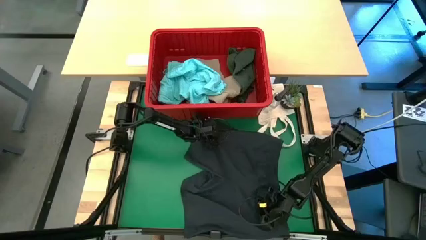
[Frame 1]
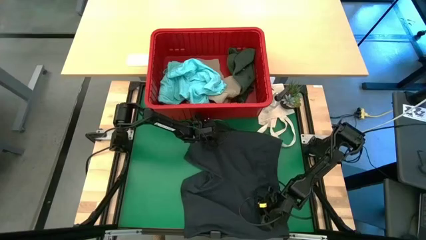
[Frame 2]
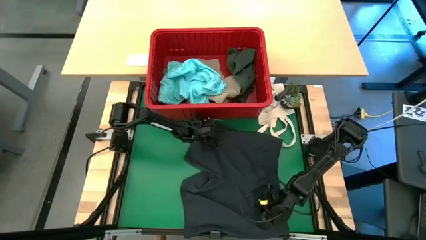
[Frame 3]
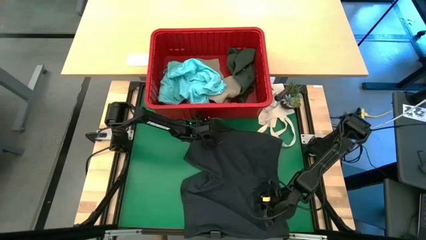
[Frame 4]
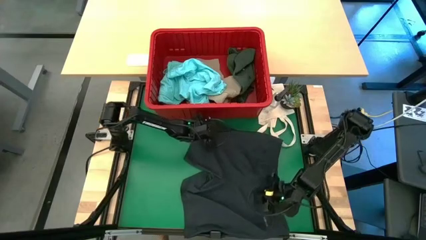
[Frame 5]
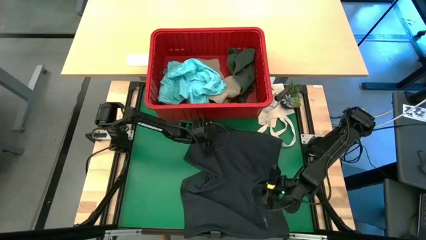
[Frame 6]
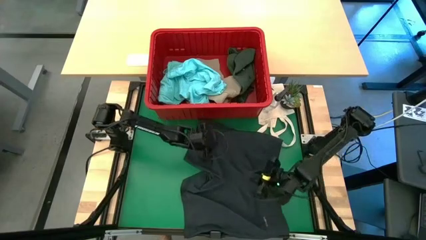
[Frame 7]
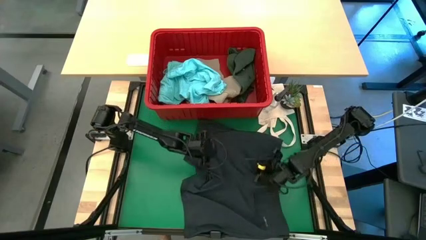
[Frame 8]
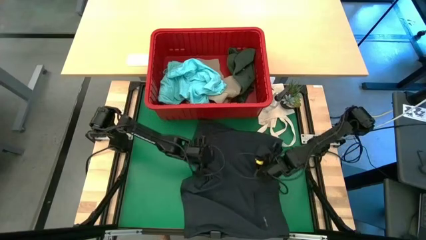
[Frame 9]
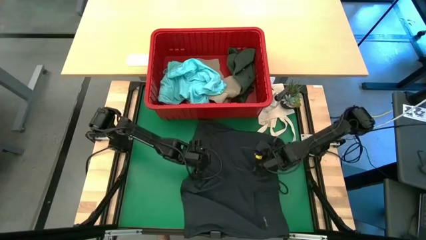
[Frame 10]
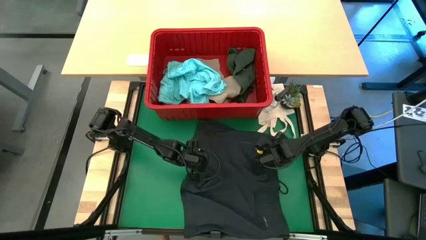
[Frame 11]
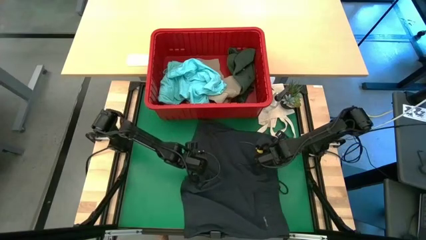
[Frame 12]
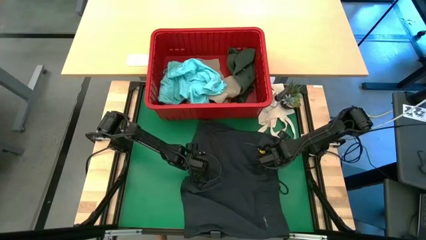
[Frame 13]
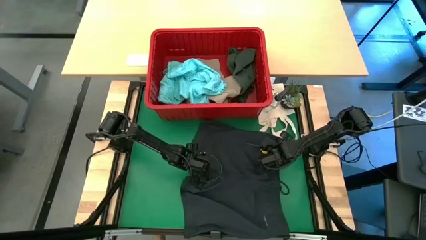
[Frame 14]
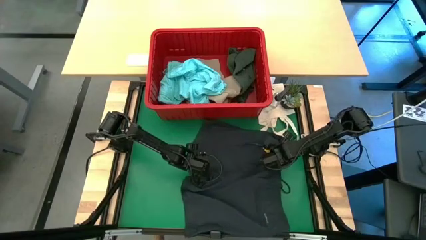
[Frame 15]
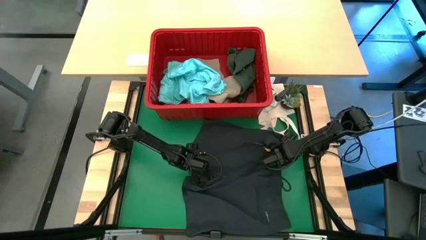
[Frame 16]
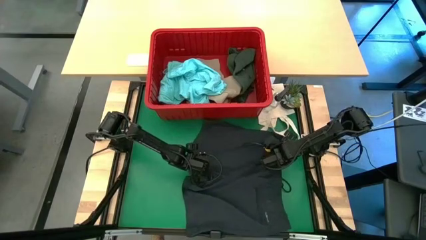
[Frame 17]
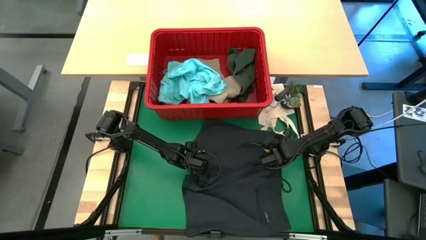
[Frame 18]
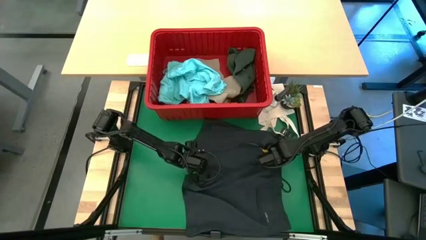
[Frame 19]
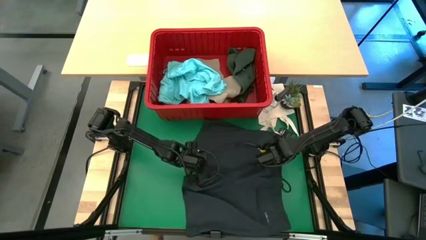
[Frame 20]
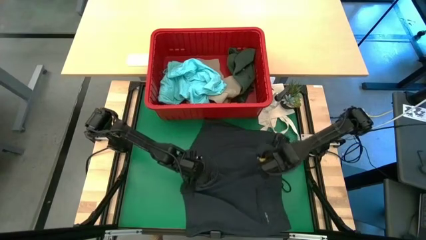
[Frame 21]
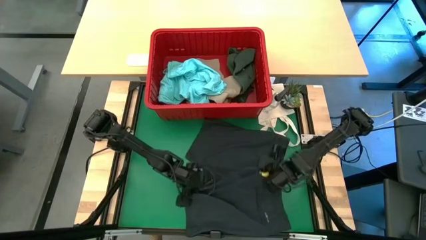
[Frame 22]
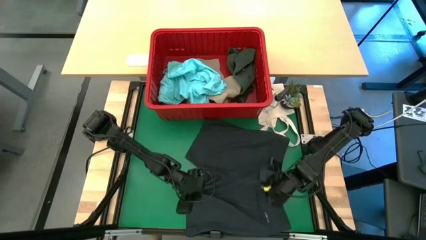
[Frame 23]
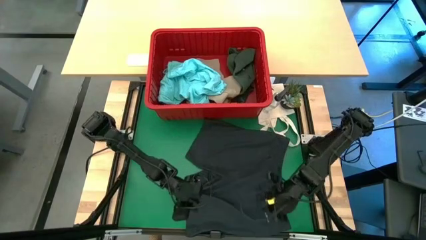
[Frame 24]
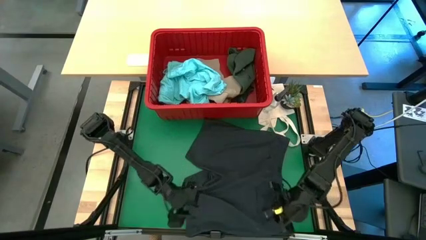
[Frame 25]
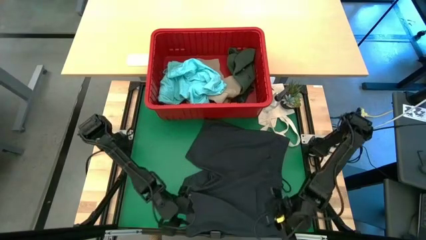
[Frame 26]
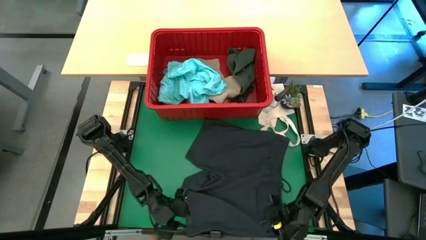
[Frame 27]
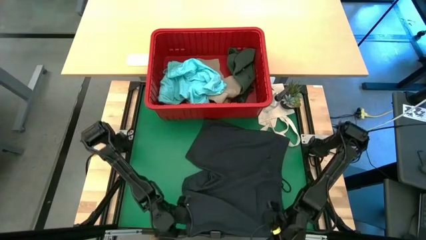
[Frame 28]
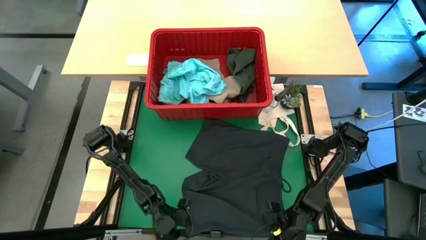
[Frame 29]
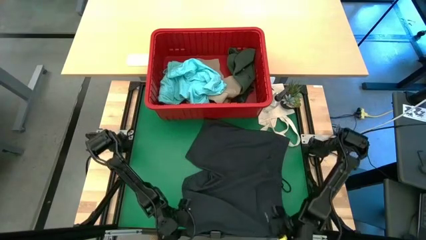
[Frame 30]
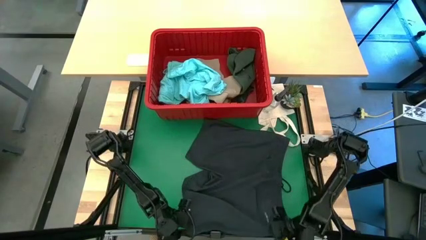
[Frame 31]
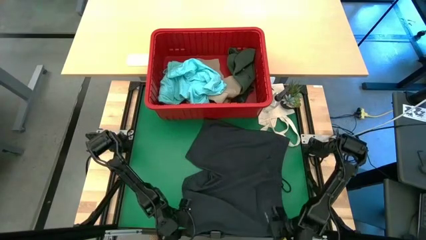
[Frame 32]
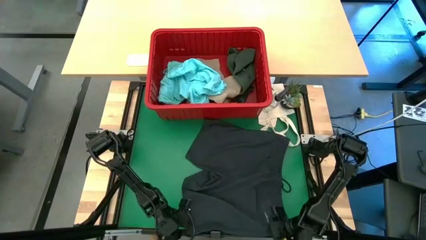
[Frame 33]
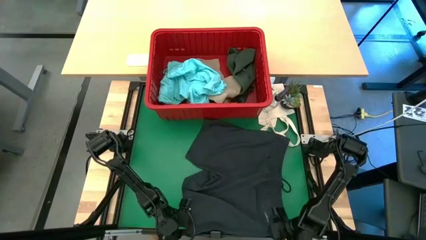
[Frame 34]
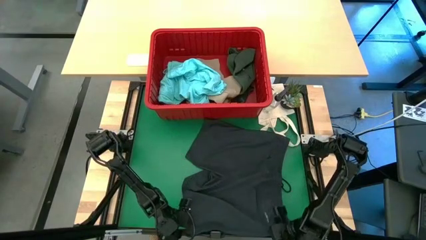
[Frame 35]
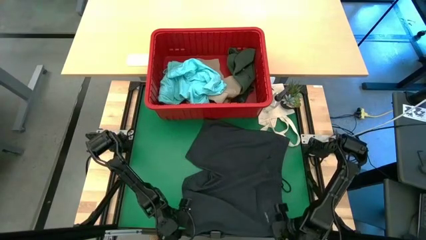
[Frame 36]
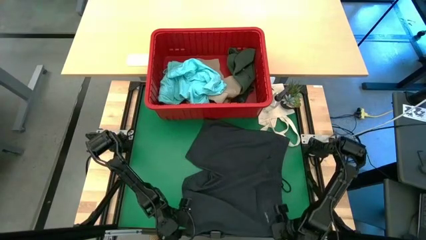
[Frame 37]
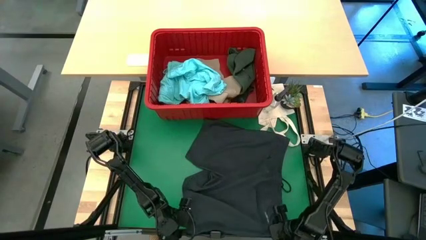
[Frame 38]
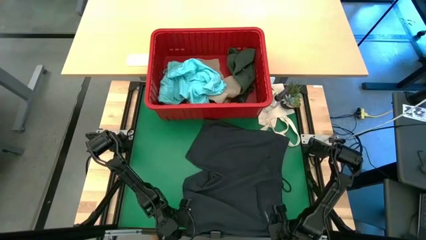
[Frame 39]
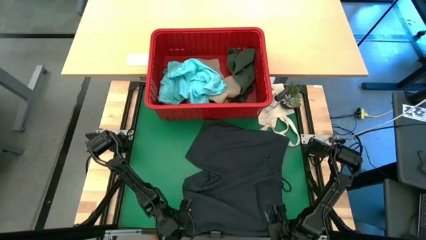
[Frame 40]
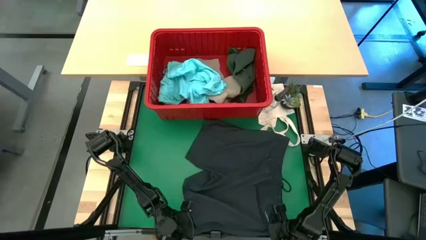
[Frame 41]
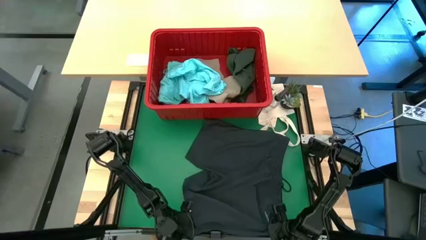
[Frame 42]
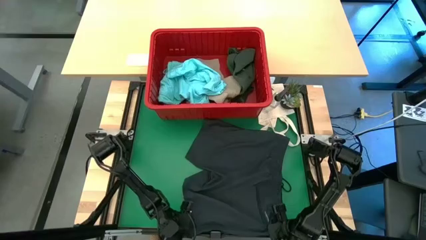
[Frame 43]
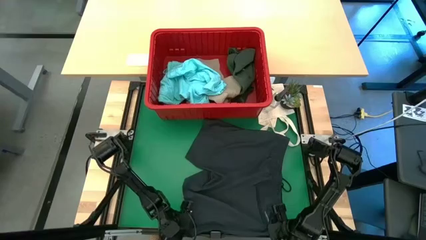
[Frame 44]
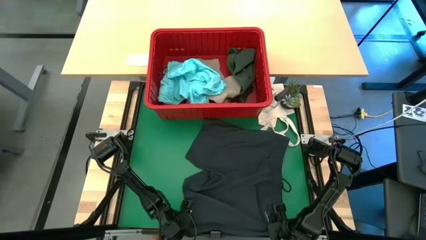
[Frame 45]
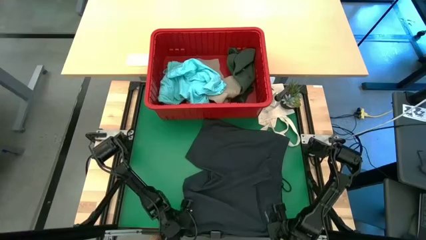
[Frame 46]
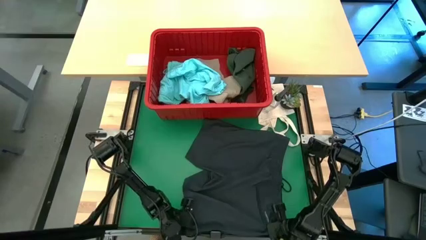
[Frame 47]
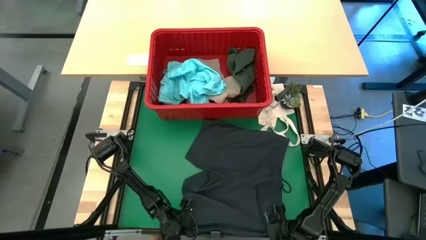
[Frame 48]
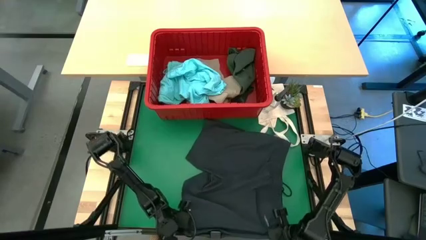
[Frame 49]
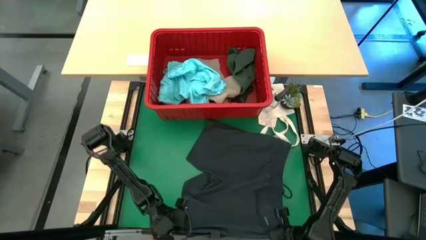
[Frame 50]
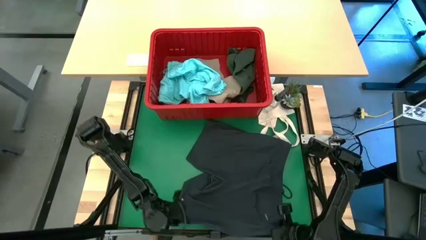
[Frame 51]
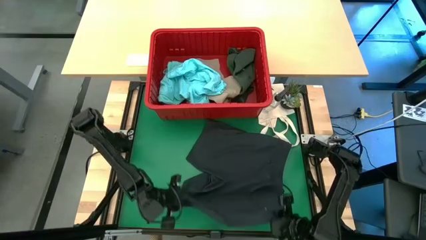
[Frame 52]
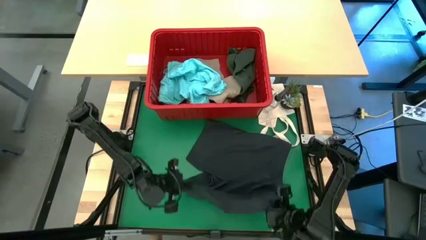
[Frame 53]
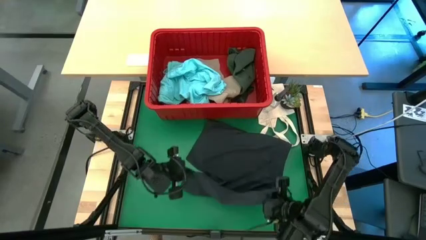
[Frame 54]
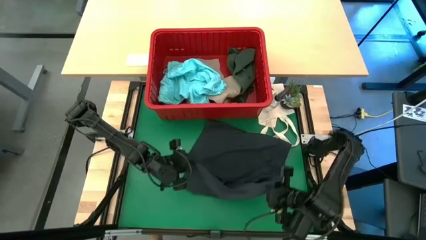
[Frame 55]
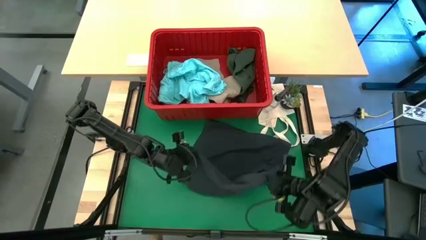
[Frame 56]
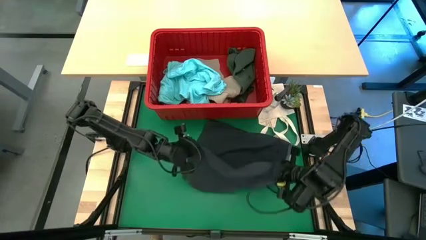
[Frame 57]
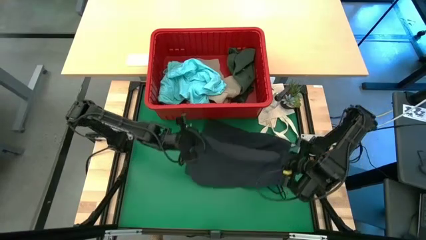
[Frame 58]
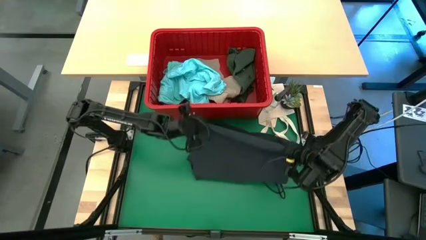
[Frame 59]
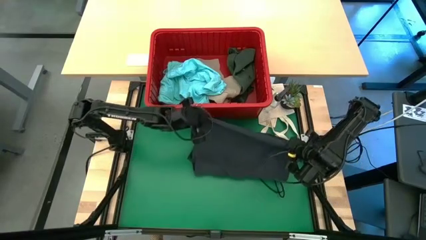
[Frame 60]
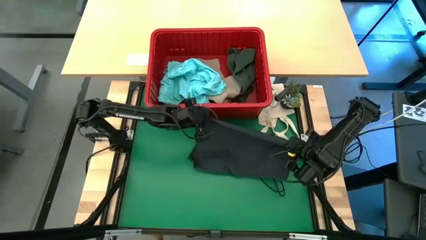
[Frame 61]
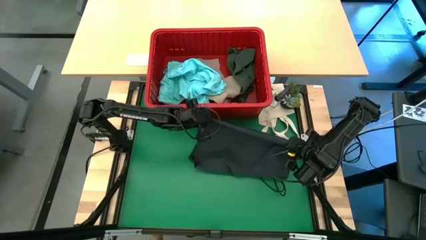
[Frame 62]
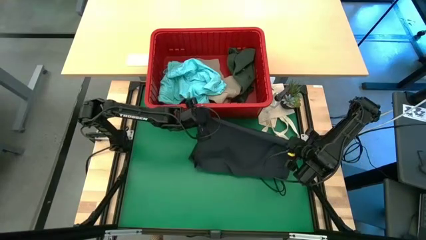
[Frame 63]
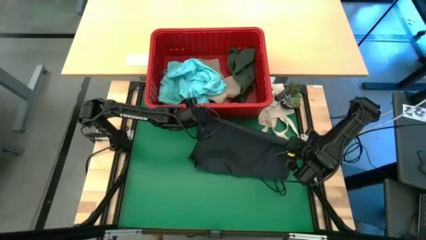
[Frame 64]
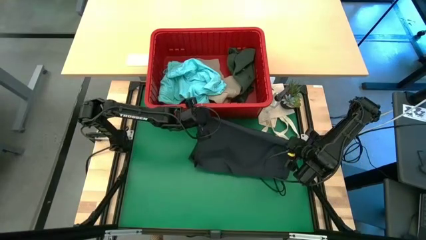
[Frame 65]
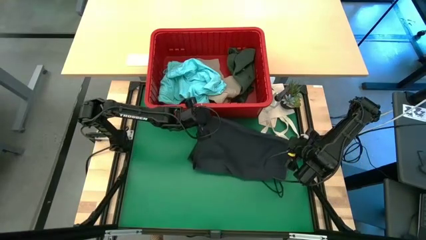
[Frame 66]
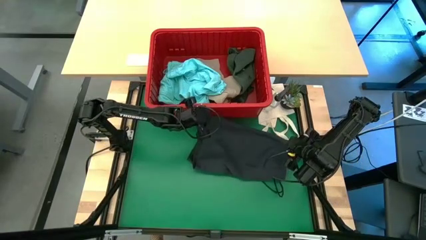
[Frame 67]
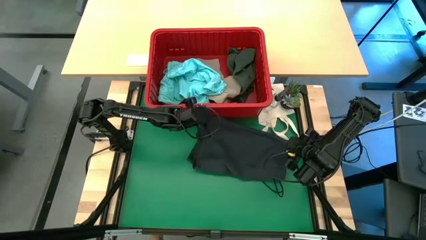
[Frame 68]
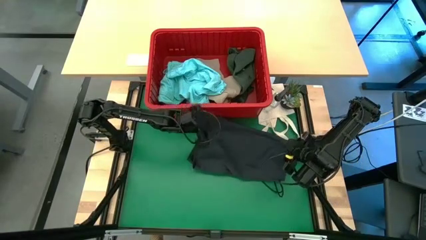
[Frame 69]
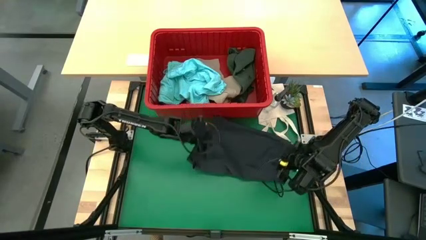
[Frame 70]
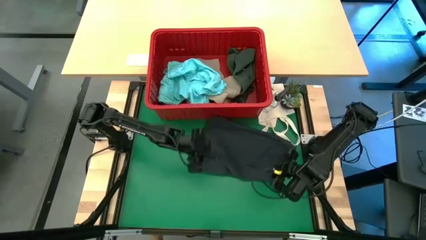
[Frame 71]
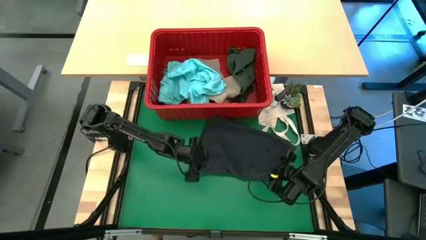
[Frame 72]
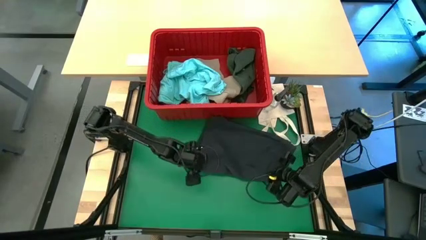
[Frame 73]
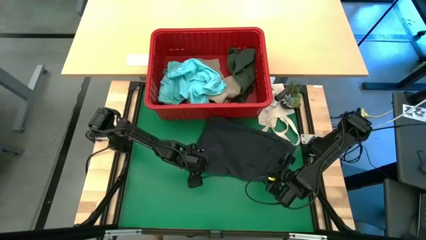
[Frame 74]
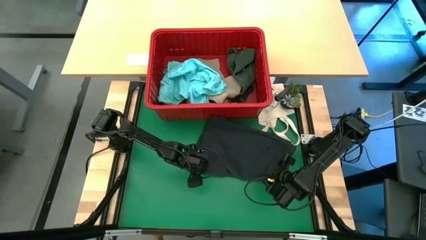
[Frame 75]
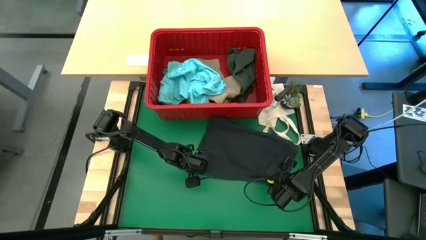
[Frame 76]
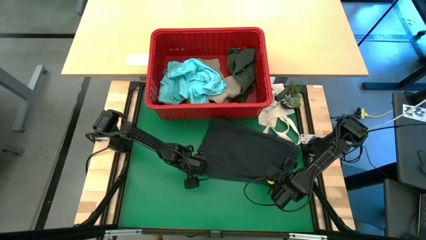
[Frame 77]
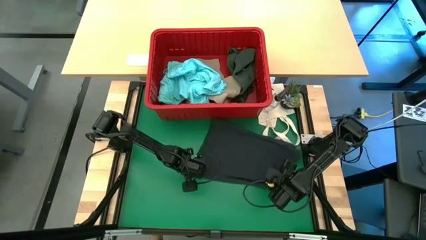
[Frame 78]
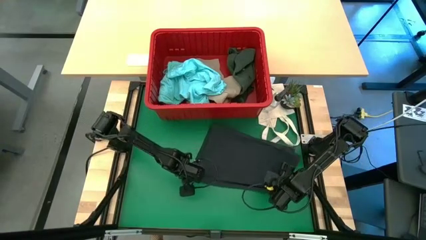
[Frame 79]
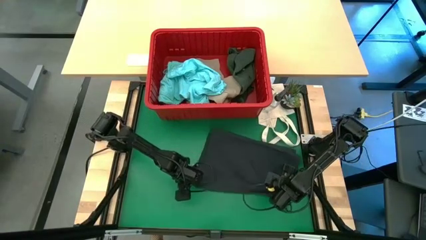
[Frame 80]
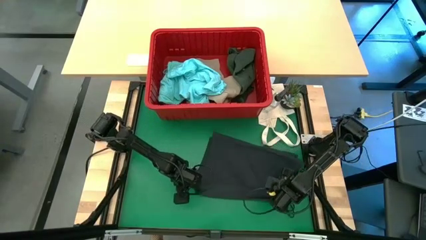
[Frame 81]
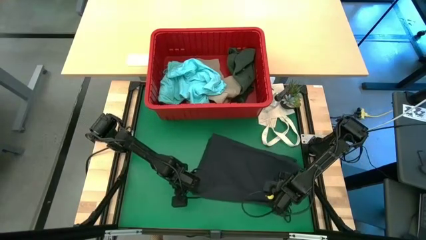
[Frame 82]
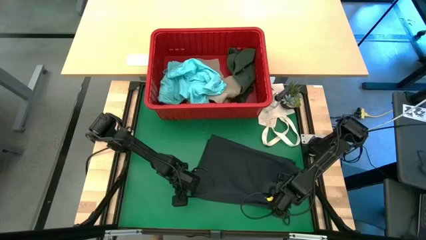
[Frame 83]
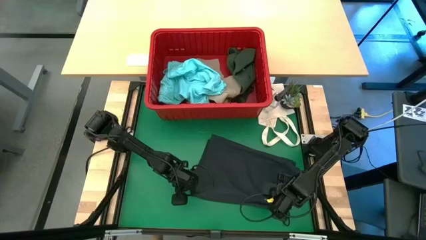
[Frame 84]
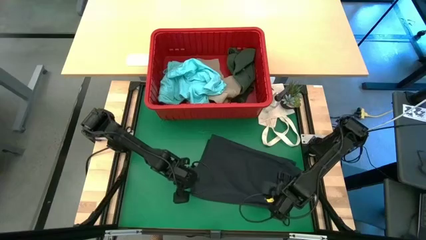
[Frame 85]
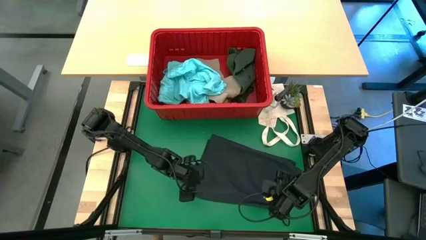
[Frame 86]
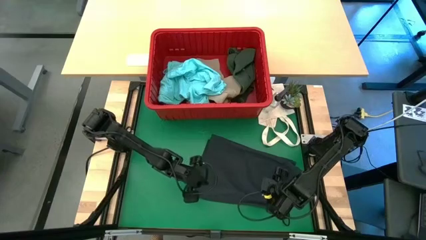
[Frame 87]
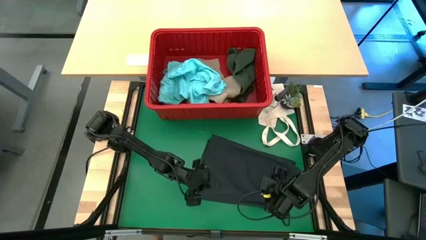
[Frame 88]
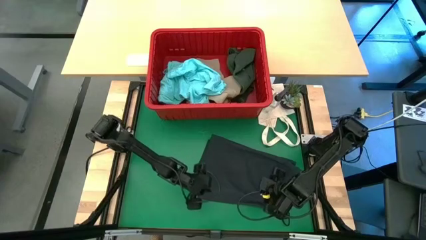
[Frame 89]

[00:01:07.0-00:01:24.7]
Task: Fold Laundry from Bin
Fold the black shorts from the red laundry bin
